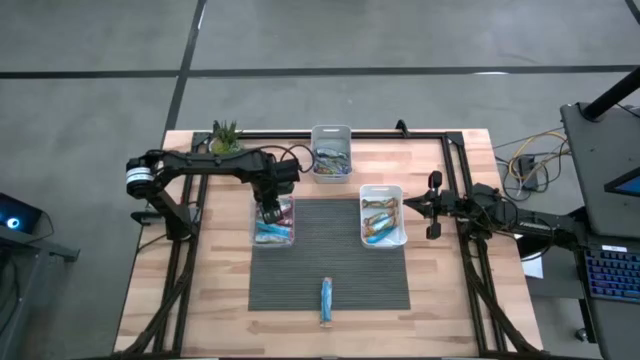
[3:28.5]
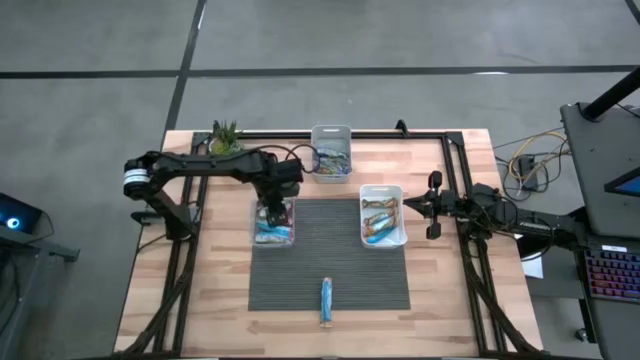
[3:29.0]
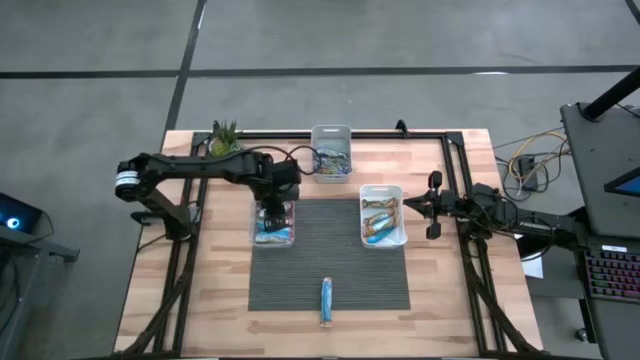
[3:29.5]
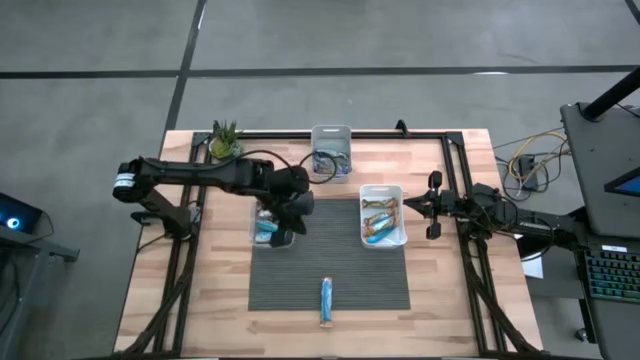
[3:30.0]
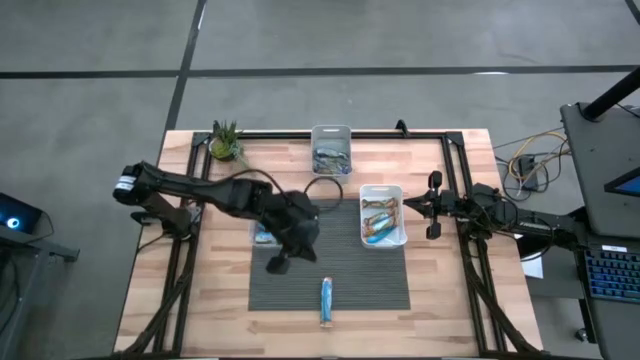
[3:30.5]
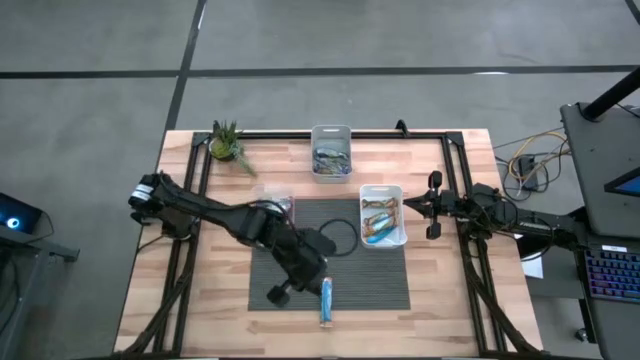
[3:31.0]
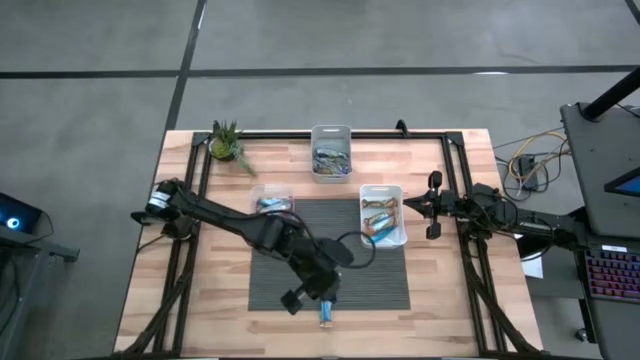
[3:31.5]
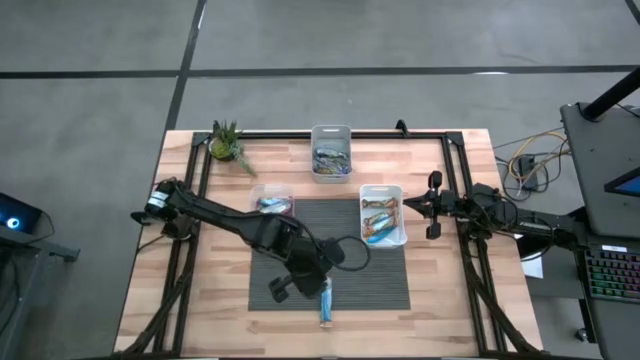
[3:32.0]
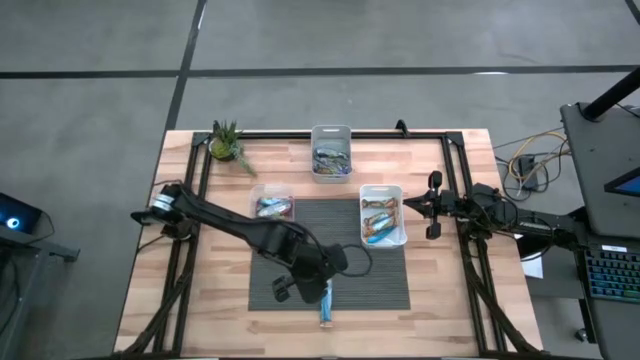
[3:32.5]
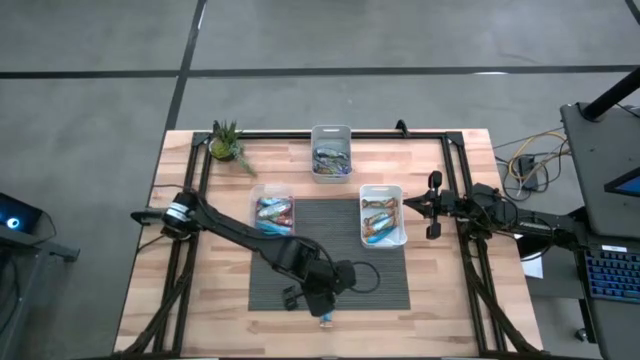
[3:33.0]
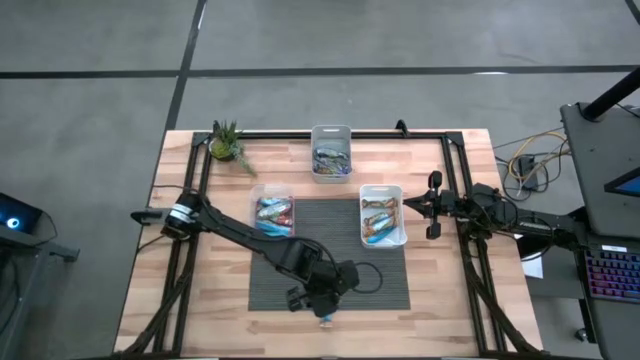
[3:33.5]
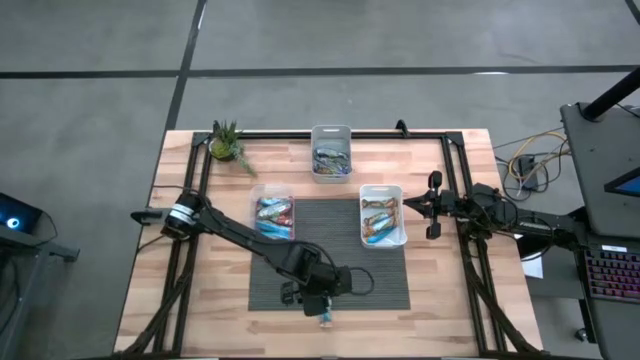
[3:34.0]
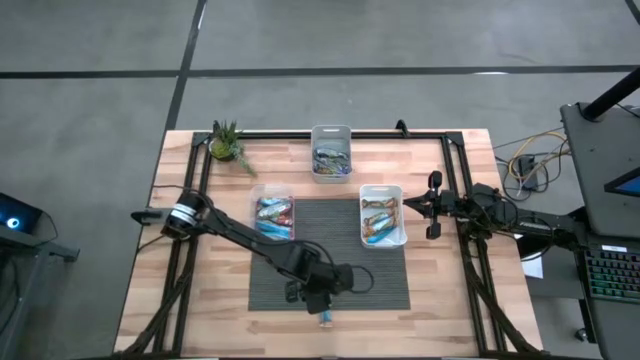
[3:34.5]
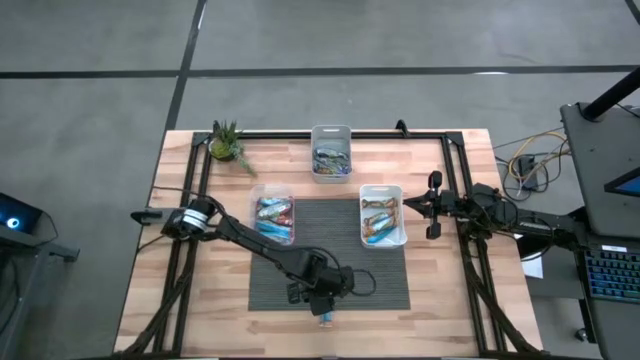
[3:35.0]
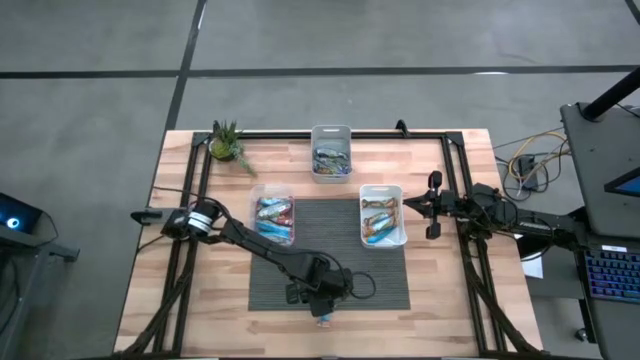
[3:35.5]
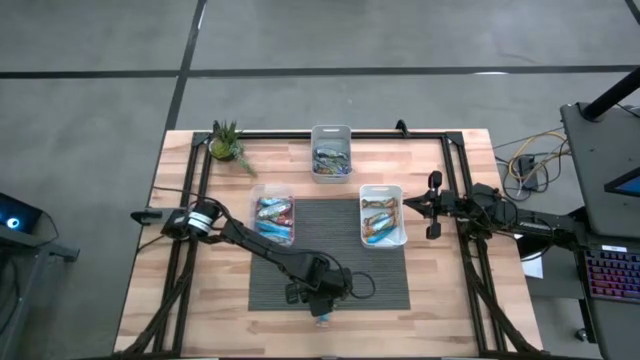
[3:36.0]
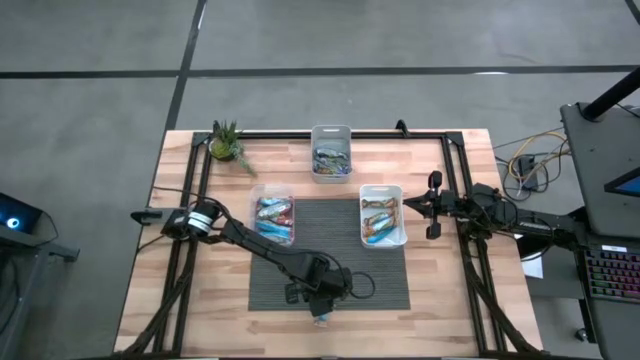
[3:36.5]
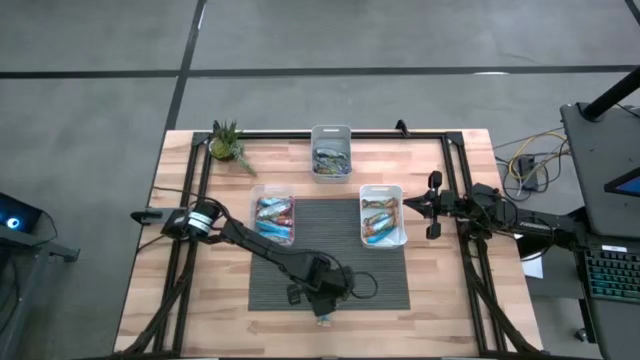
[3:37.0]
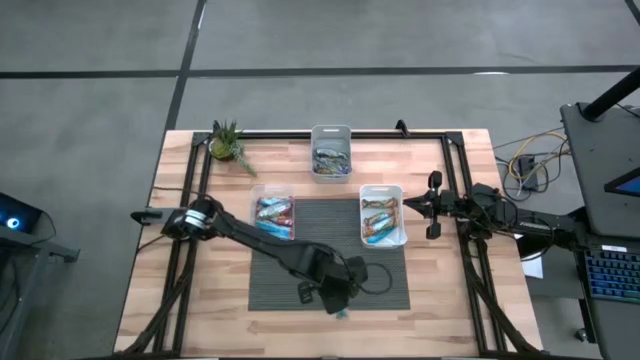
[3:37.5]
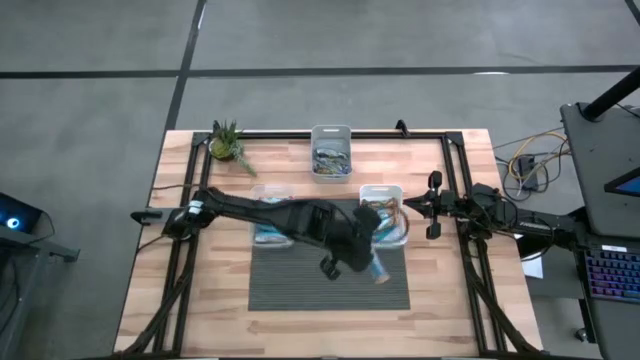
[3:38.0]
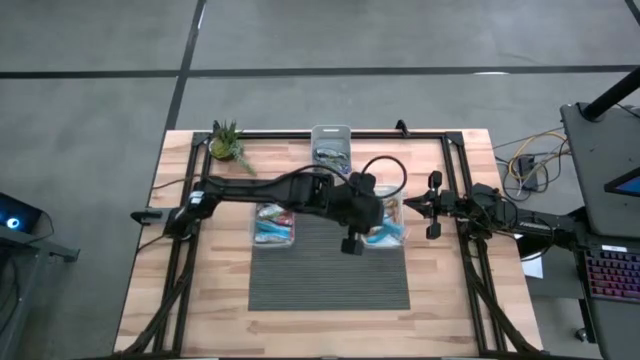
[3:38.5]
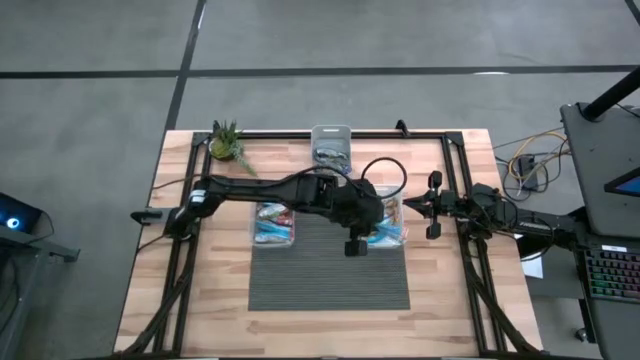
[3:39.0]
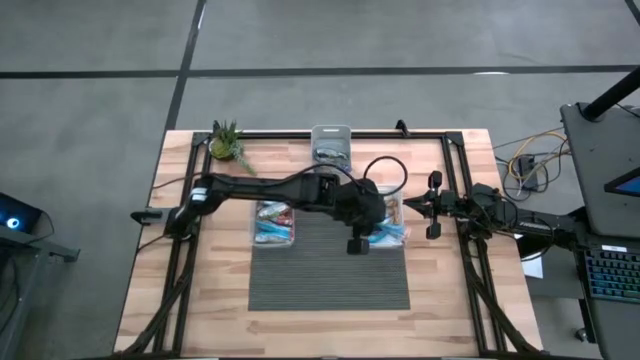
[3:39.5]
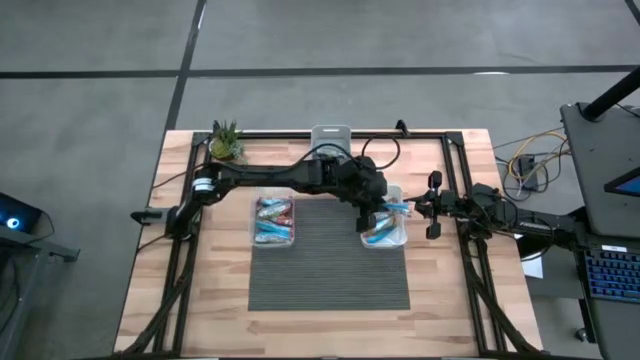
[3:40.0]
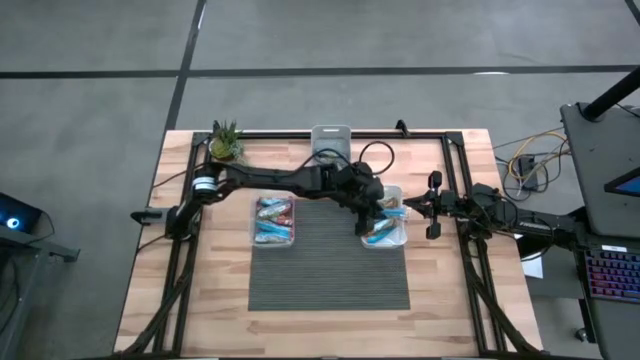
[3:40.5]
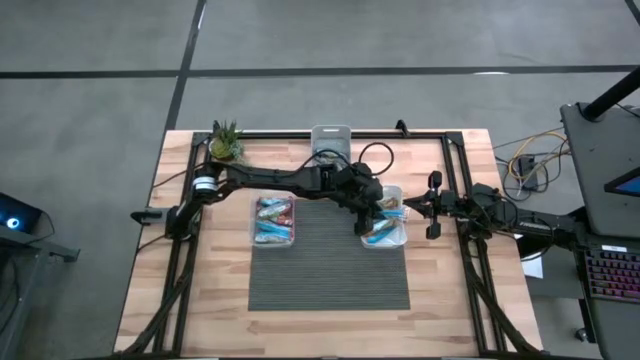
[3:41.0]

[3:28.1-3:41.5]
Task: Pick and place Granola Bars by type
Put the yellow granola bar into the white bin

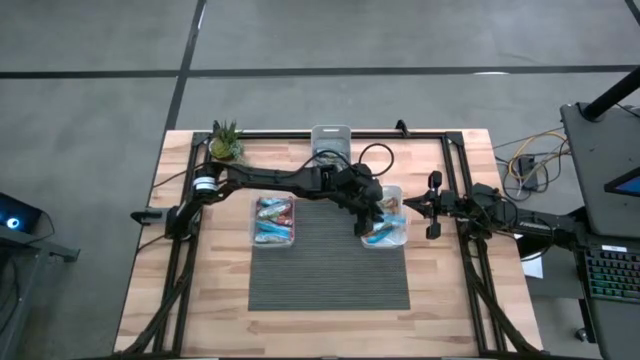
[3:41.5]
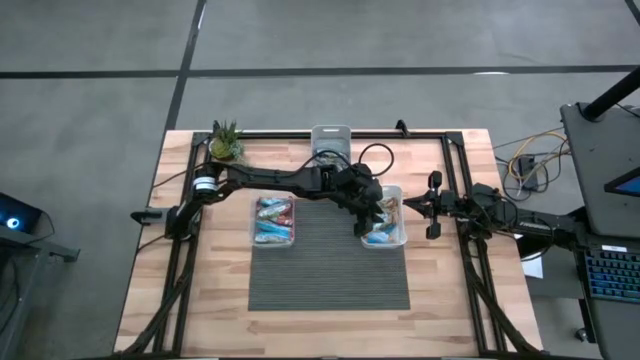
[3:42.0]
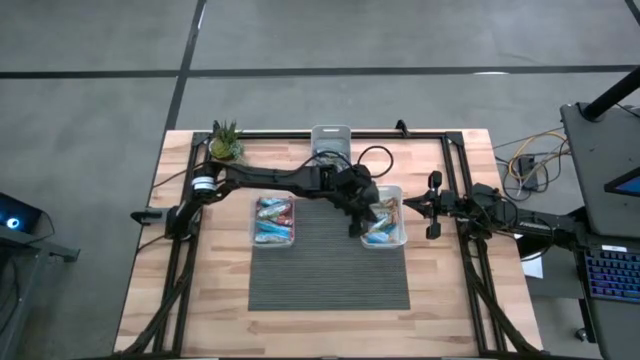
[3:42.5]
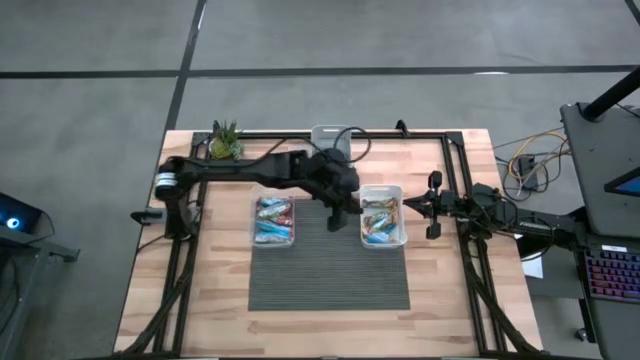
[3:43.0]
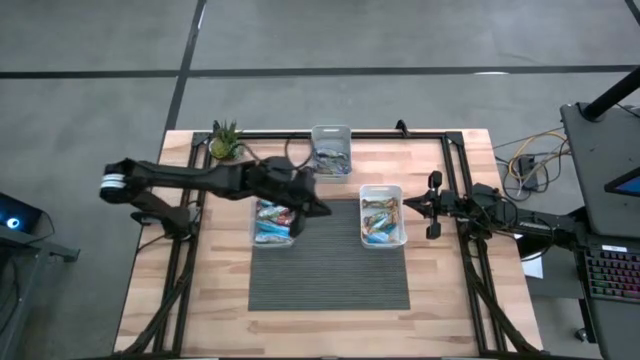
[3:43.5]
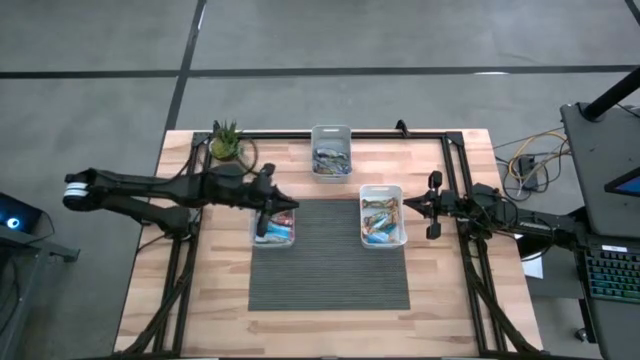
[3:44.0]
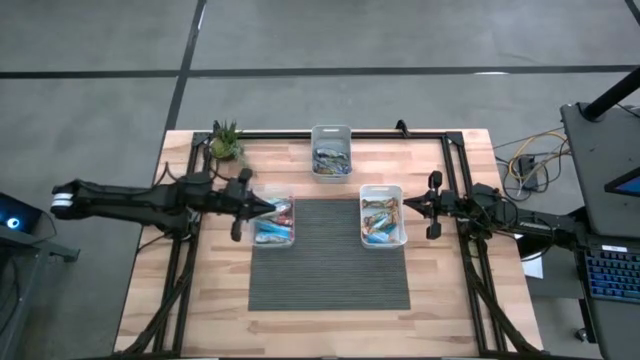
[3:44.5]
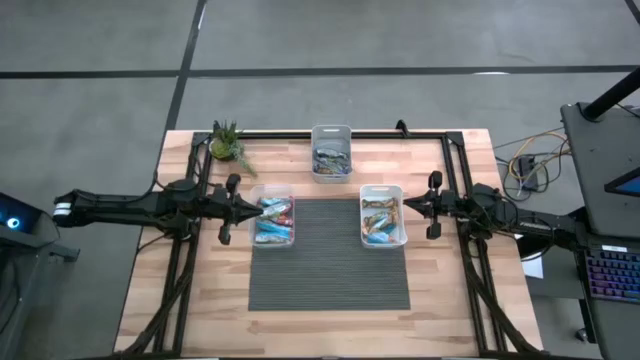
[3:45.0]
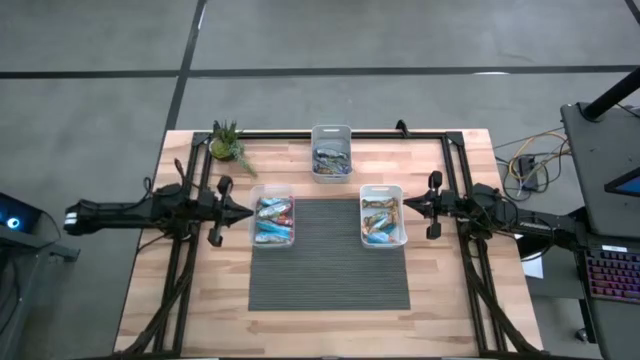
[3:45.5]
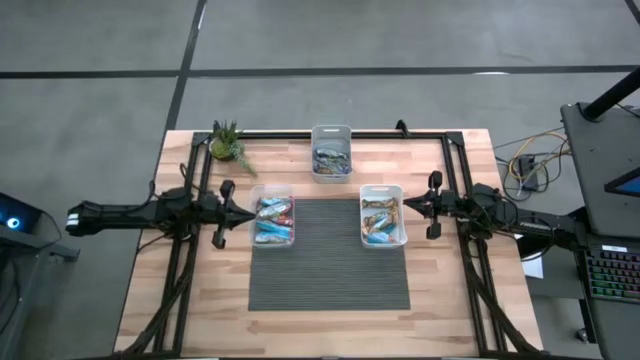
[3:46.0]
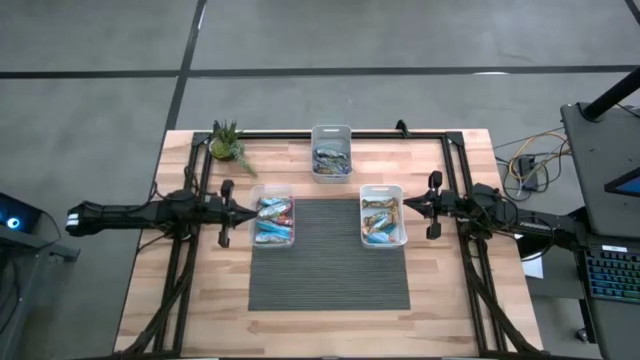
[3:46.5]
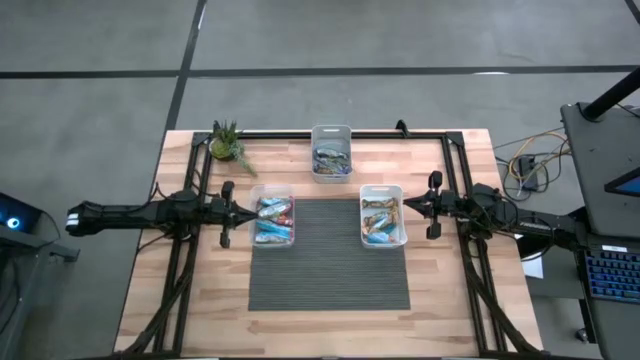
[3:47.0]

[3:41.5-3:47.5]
Return to Home Position

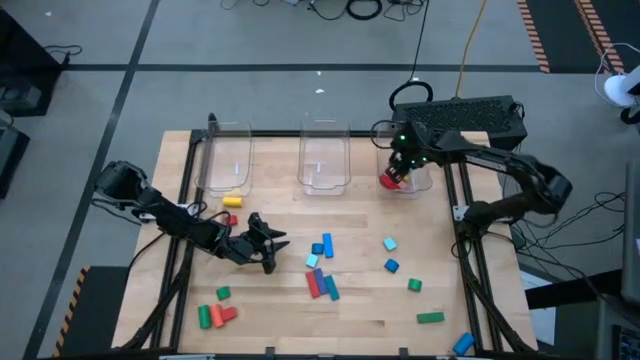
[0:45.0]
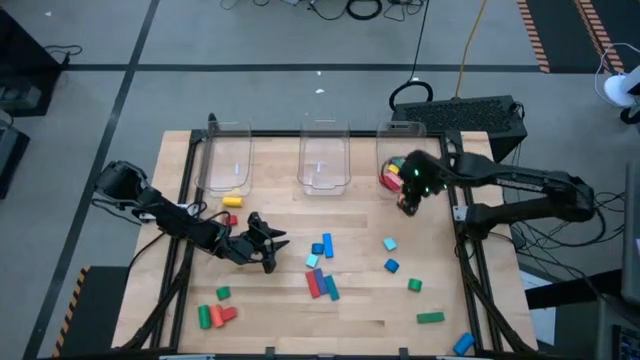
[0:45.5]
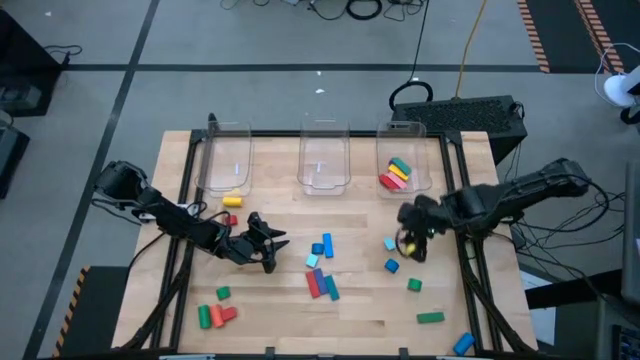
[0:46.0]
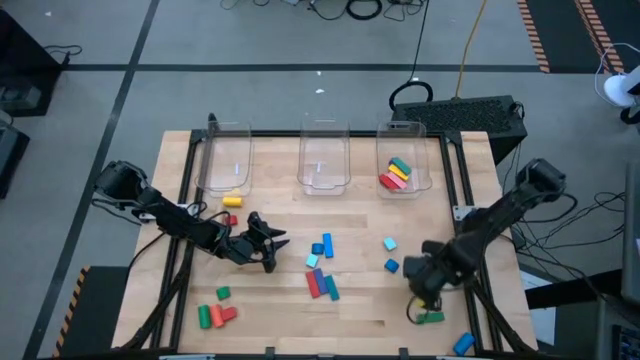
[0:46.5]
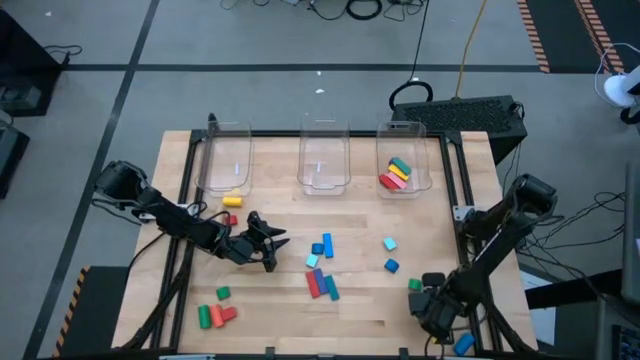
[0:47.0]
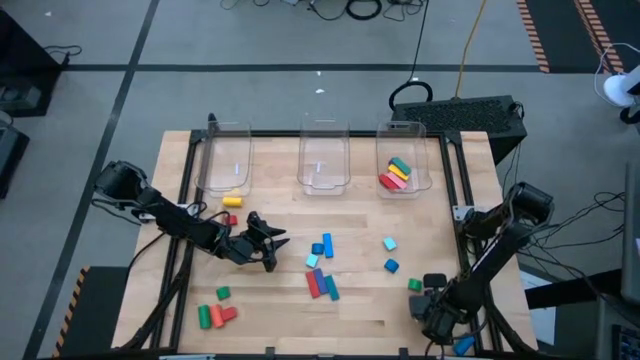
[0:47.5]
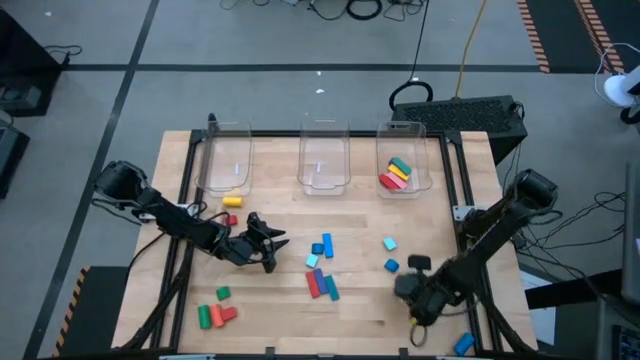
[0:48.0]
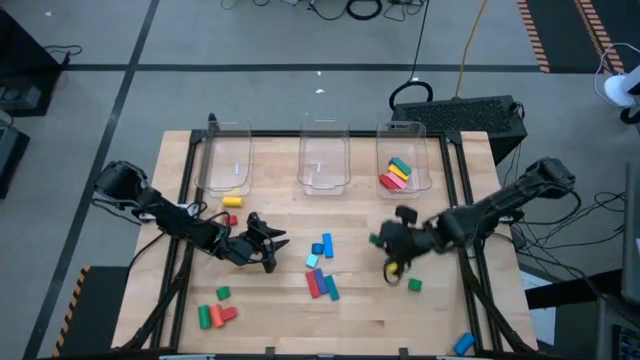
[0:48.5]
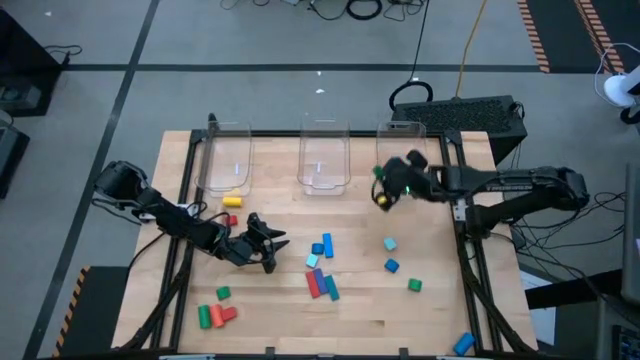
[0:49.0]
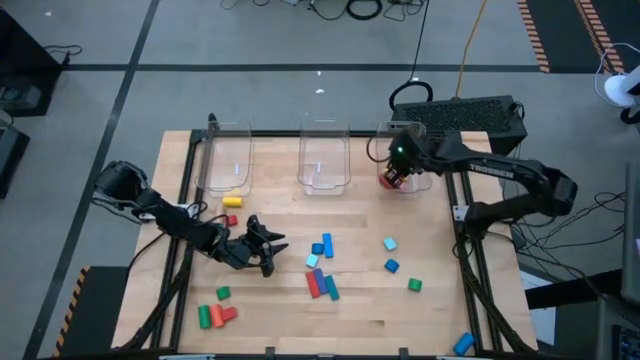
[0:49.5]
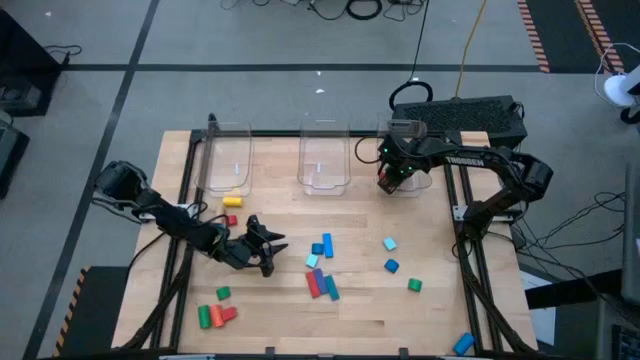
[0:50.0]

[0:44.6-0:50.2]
Task: Sort blocks by size
Put the green rectangular block into the right transparent bin
